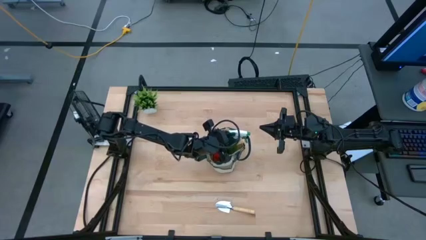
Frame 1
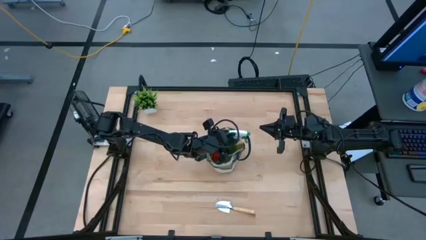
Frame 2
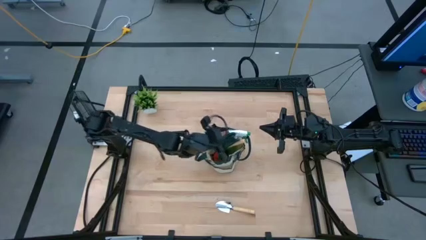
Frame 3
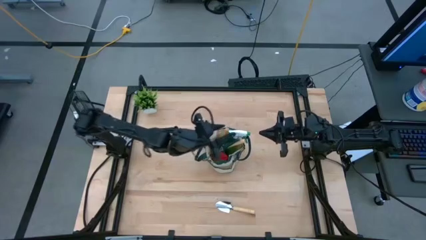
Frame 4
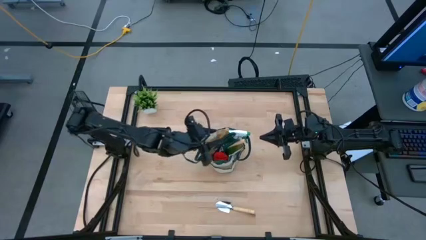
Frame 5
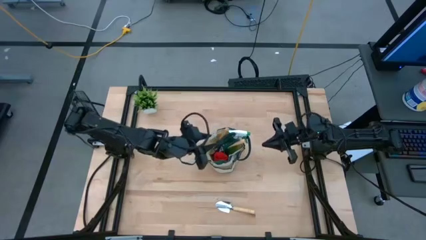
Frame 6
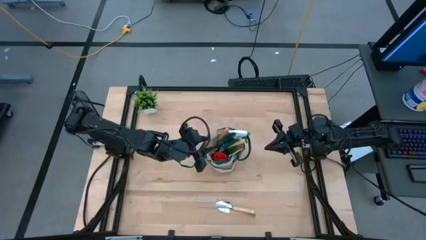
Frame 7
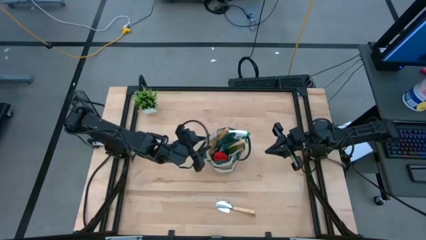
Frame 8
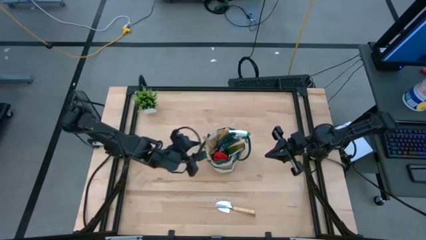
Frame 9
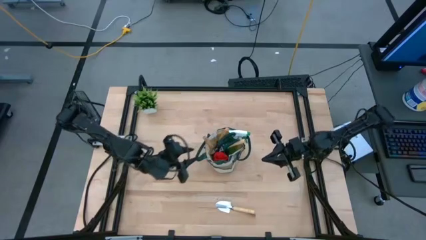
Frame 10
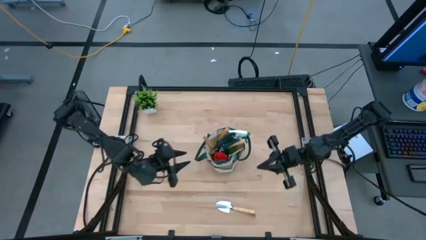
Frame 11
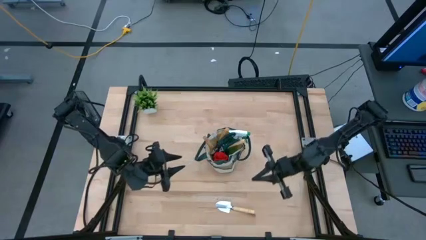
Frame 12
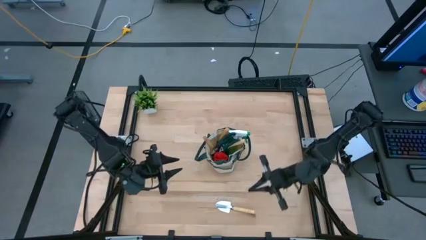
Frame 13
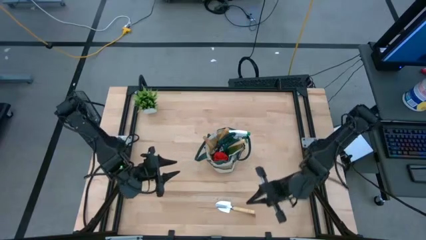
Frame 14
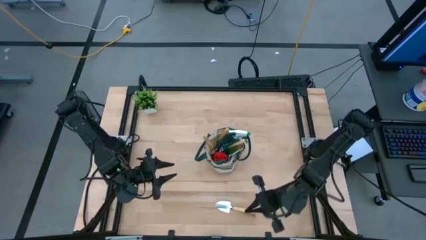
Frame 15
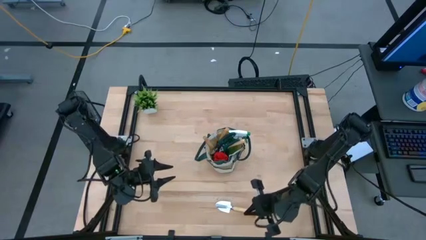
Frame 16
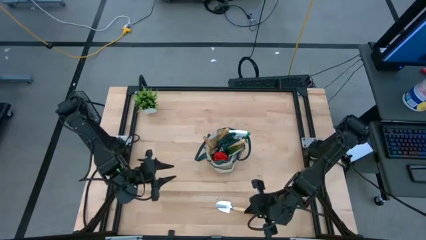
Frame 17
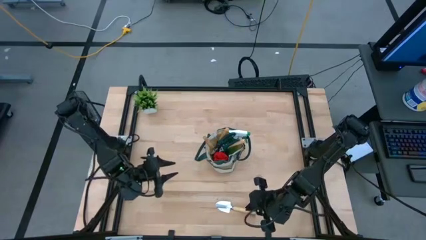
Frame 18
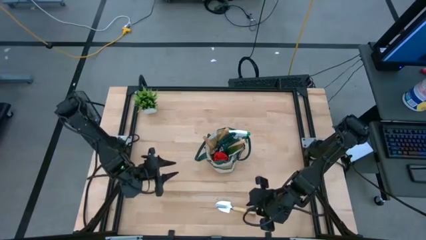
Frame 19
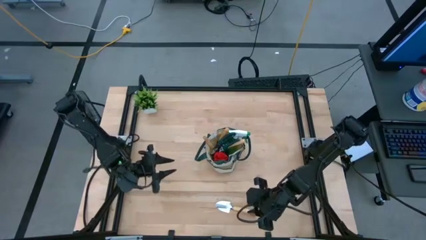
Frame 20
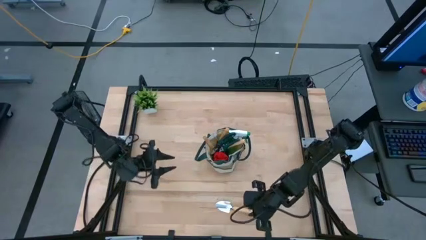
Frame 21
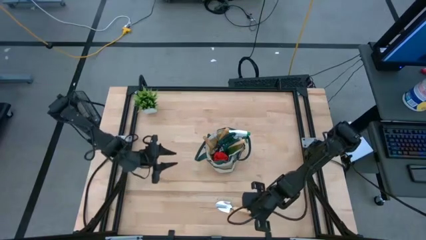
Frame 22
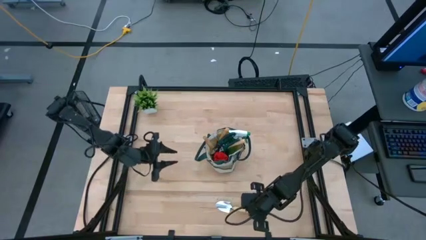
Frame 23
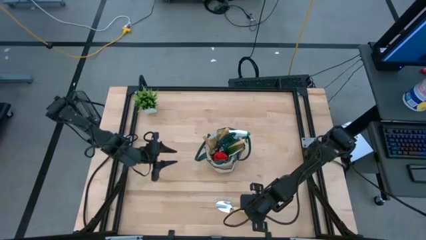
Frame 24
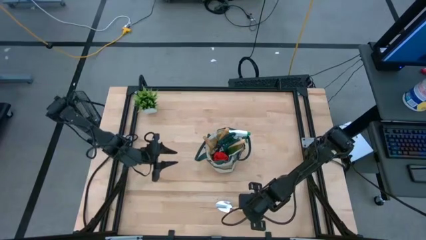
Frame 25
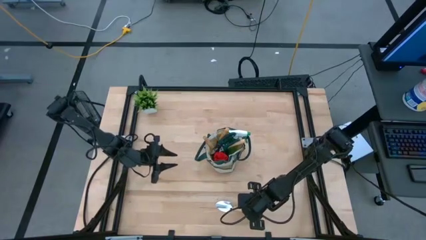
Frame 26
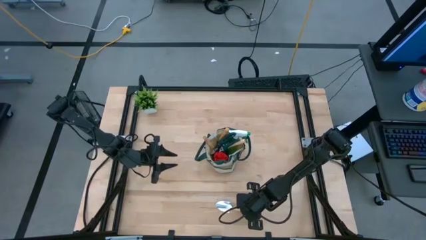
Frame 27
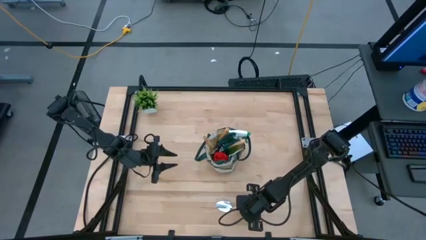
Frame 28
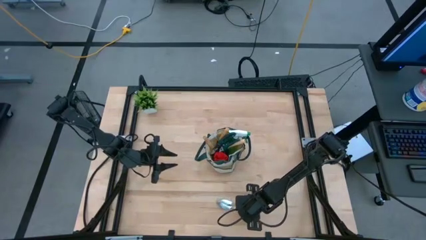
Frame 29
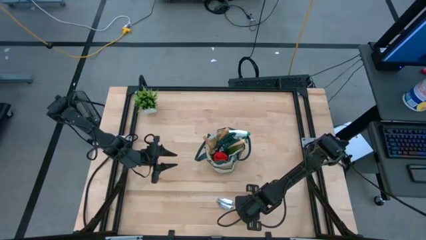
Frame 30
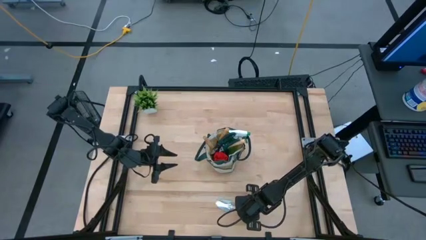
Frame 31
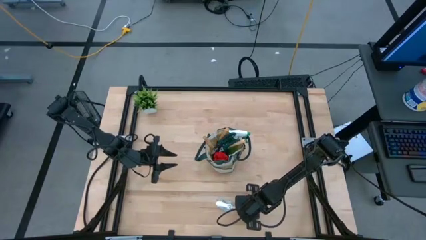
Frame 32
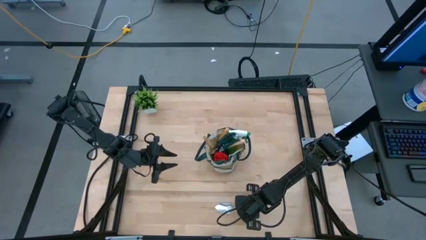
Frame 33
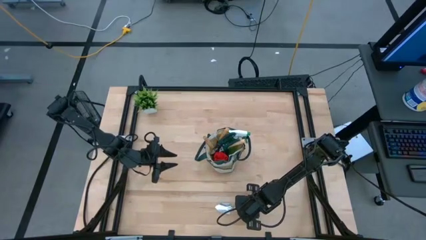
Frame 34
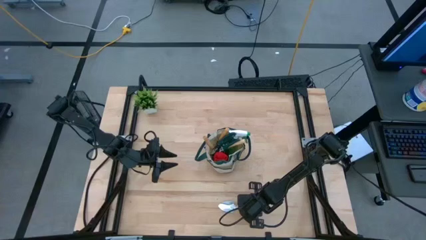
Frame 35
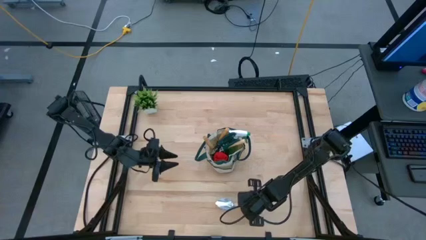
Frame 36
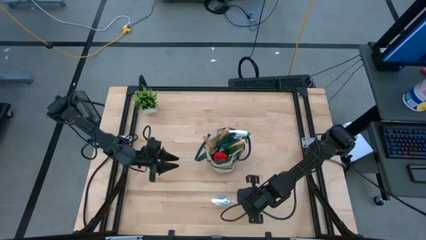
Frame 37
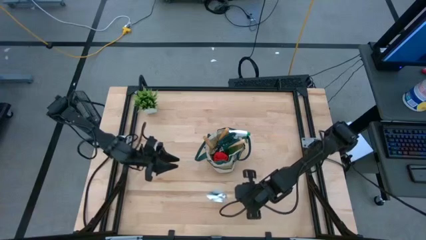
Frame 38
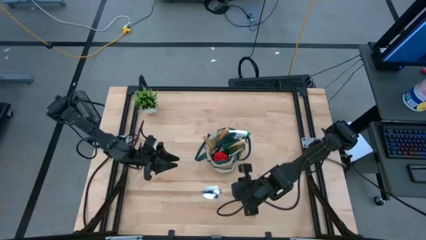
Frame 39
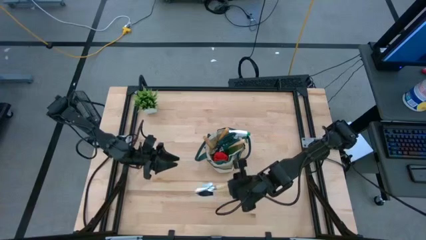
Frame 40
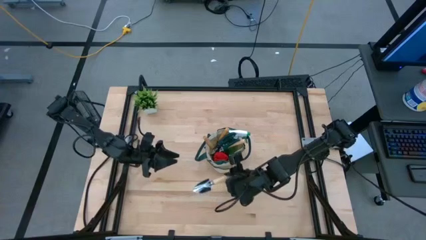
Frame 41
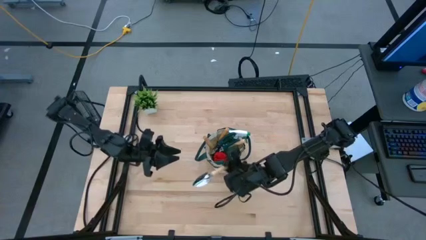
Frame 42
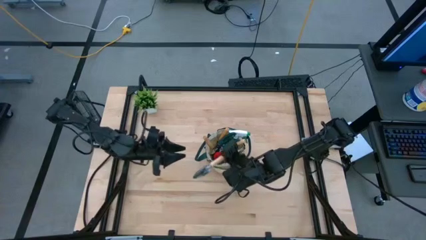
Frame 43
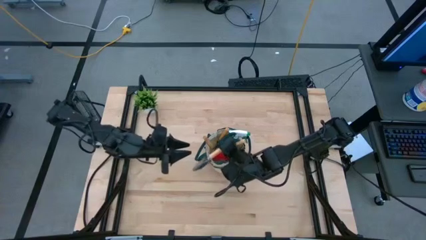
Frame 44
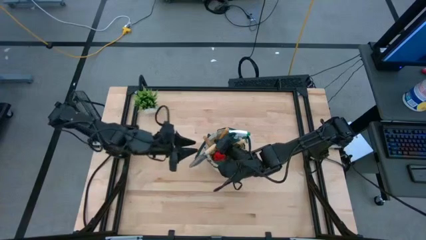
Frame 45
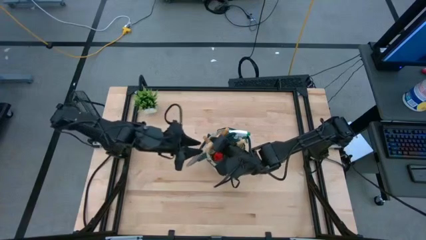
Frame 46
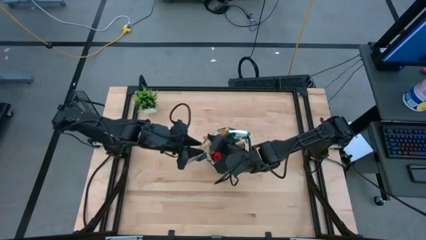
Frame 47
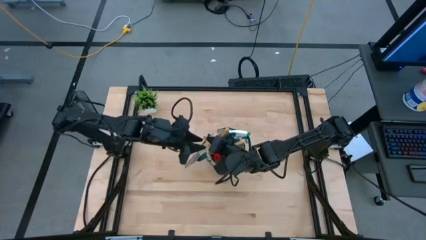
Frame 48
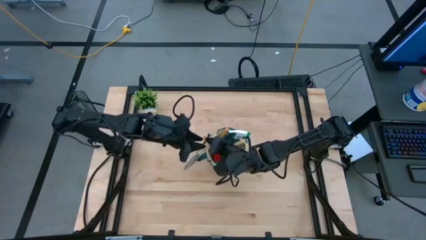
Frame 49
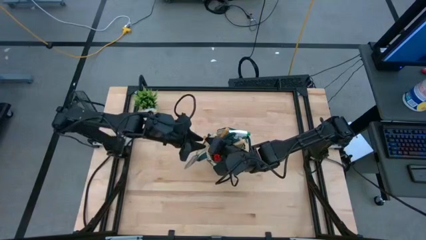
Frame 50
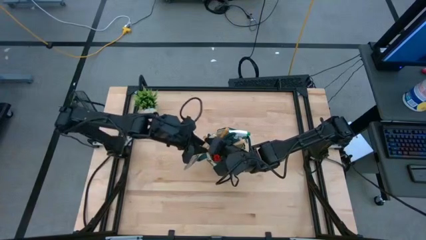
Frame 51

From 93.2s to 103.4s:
Task: Pick & Place Garden tools in Gardening bag
Put the light brown trowel into the light brown gardening bag
